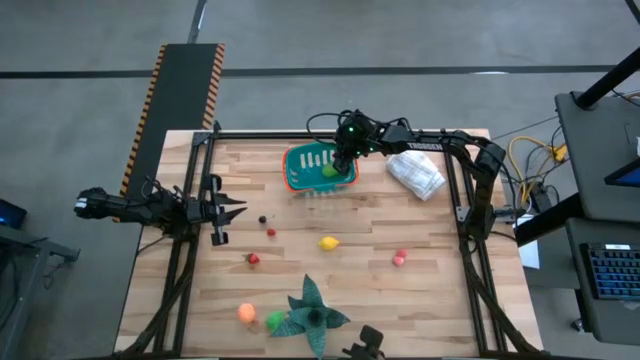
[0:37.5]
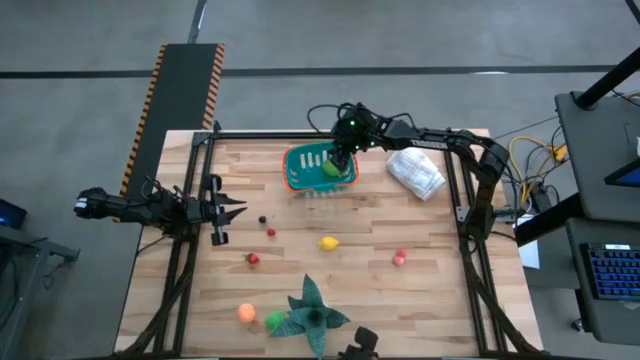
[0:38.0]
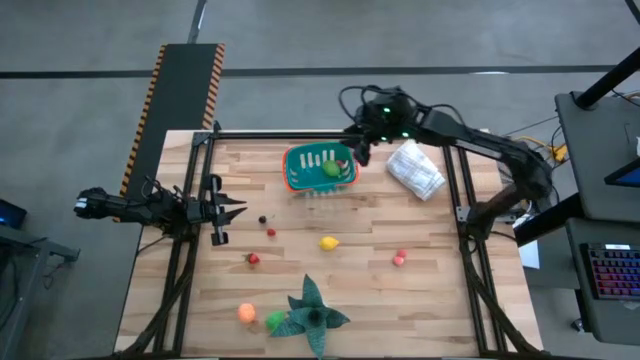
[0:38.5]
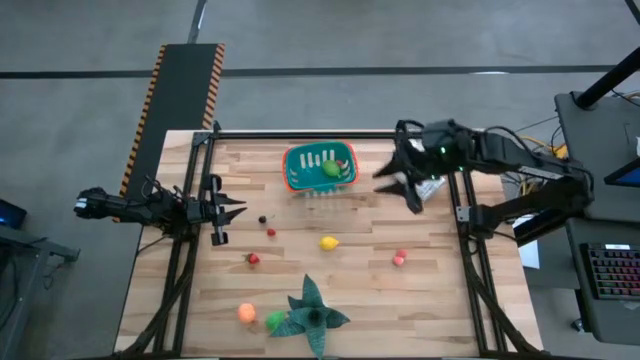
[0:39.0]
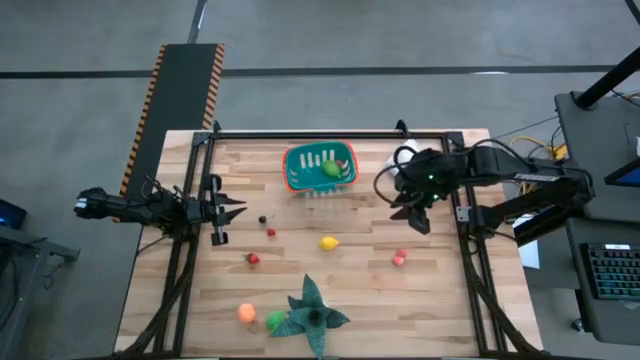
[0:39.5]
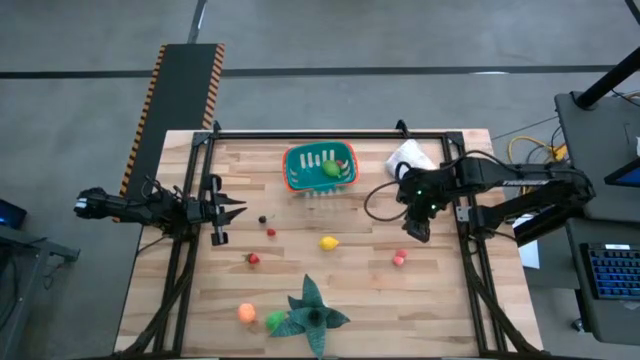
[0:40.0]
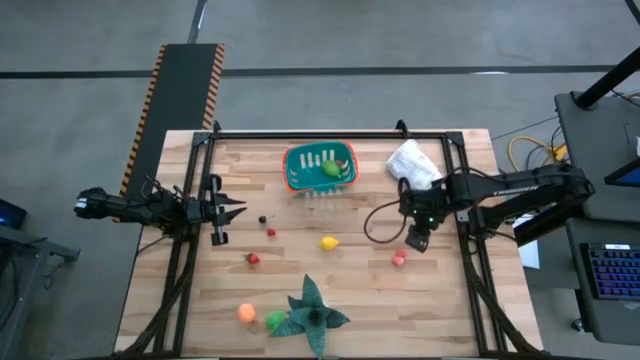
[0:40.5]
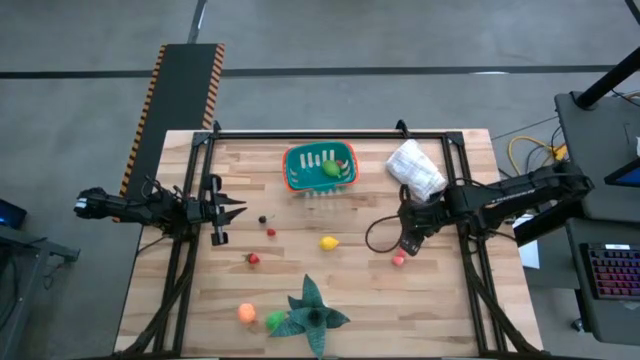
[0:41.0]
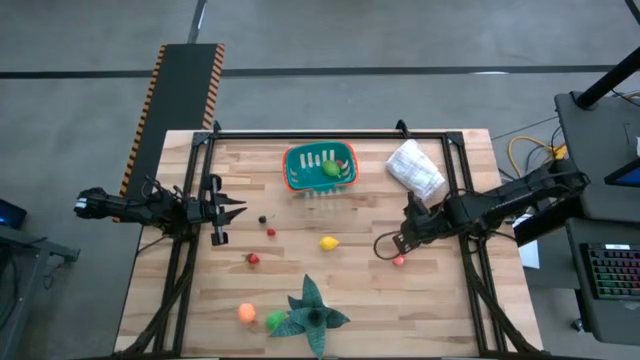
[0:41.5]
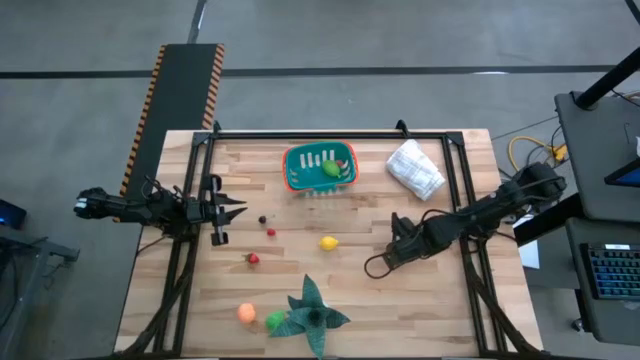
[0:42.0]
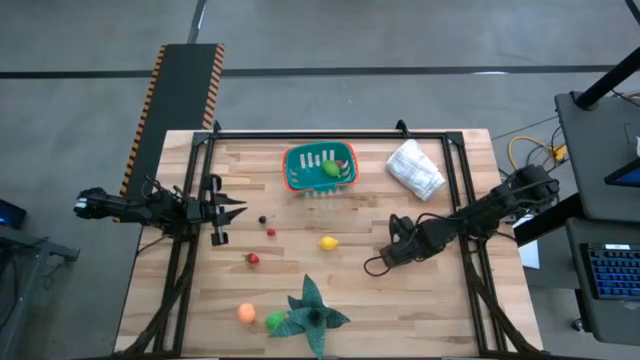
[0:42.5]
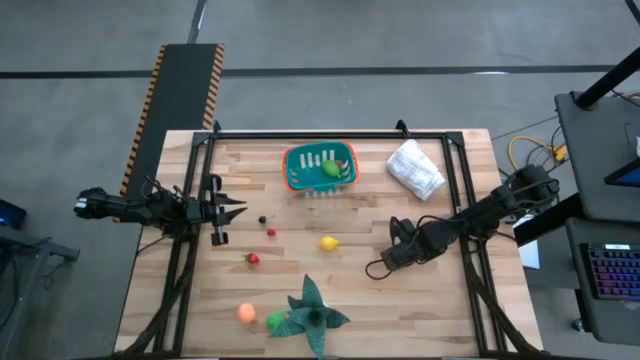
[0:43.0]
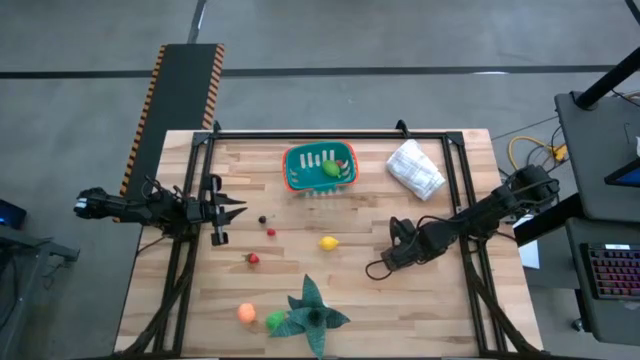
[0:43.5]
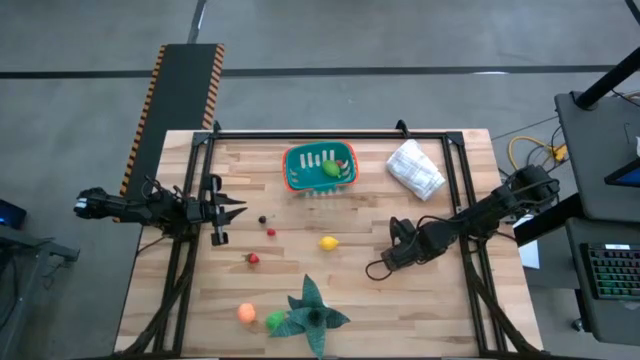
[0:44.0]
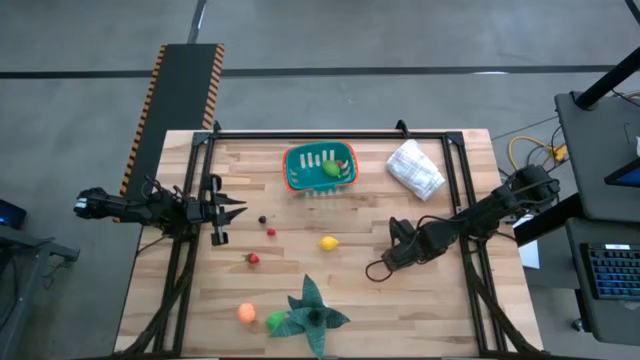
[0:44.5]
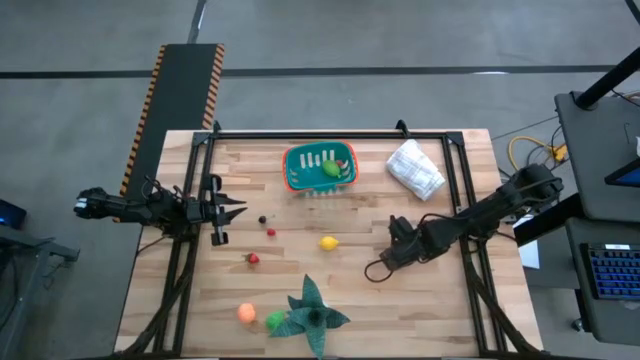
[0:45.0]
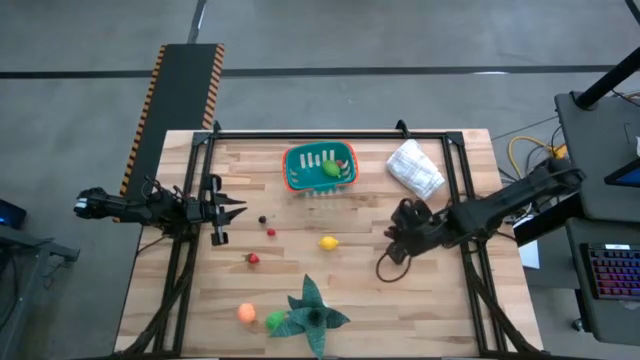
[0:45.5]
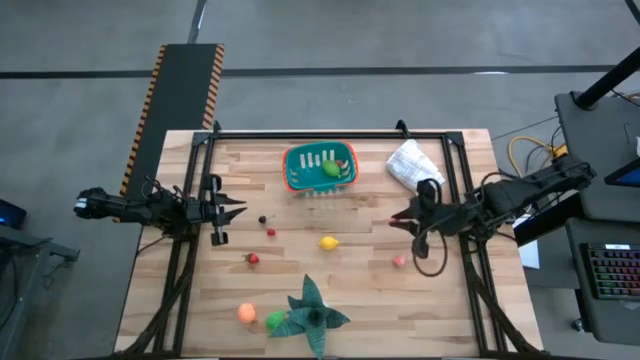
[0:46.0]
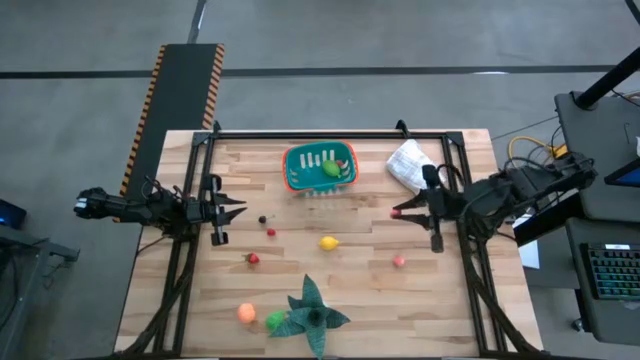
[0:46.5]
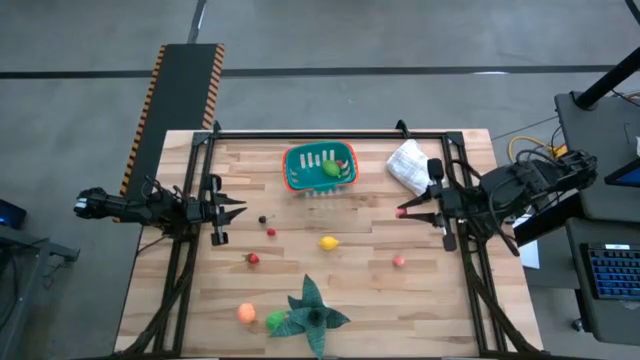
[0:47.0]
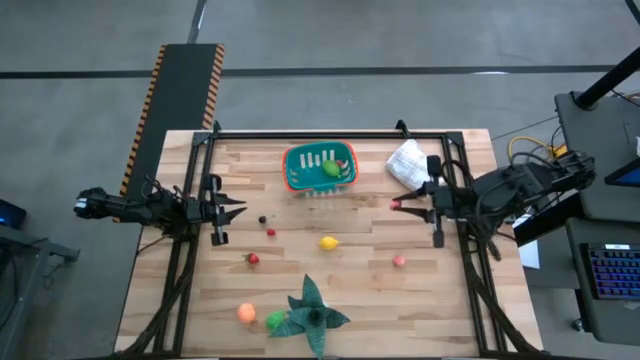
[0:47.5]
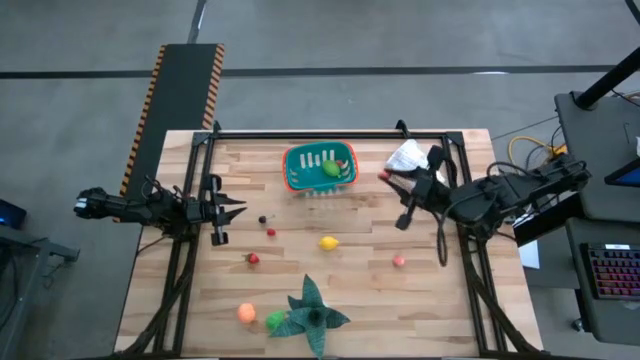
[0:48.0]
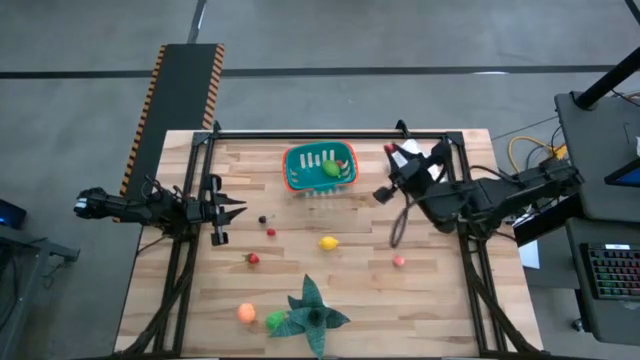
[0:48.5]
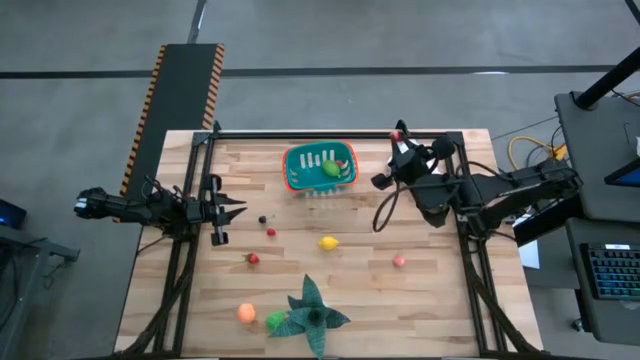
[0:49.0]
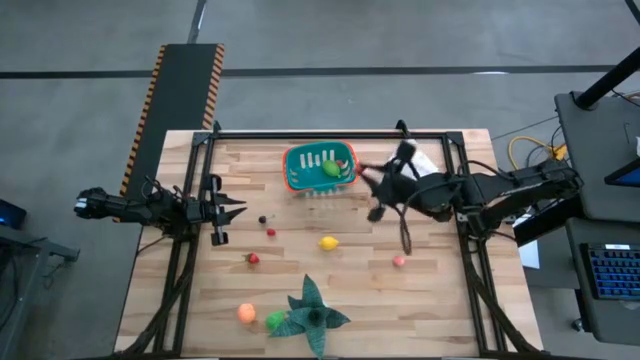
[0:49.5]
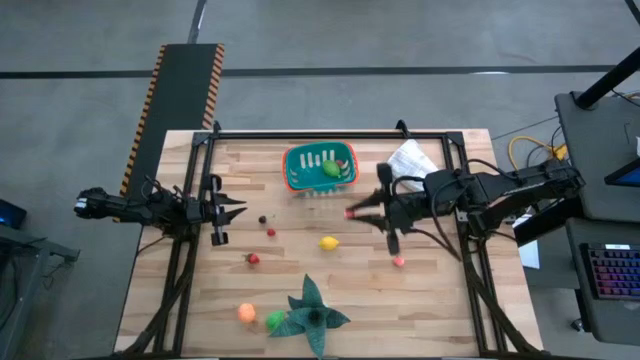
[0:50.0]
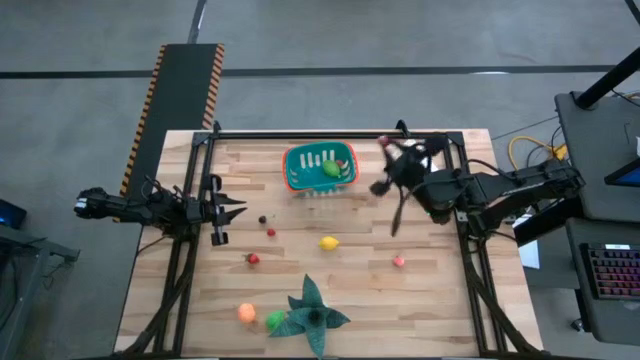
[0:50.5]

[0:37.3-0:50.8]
Task: Pick and placing Produce into tupperware
Put the peach toy into the bin
